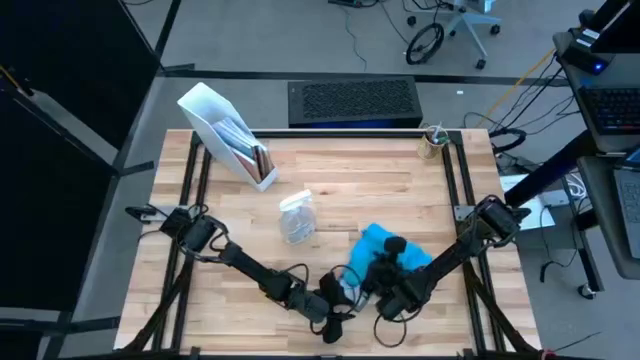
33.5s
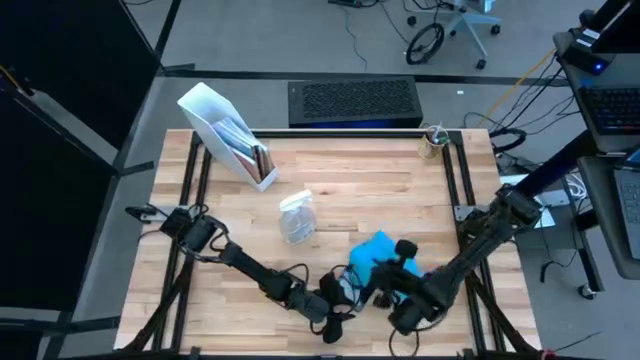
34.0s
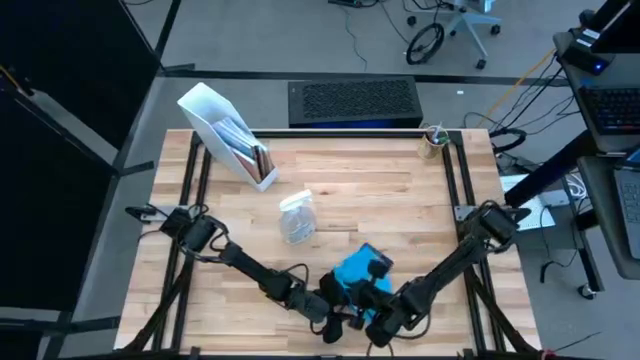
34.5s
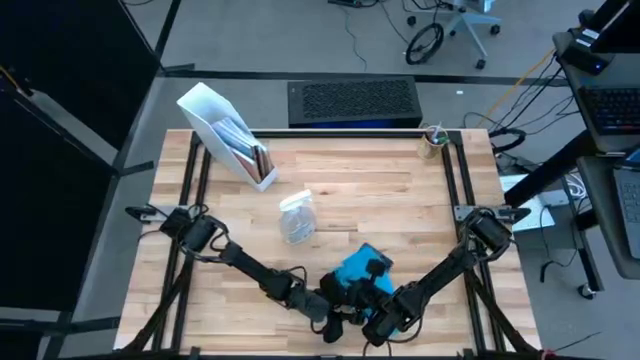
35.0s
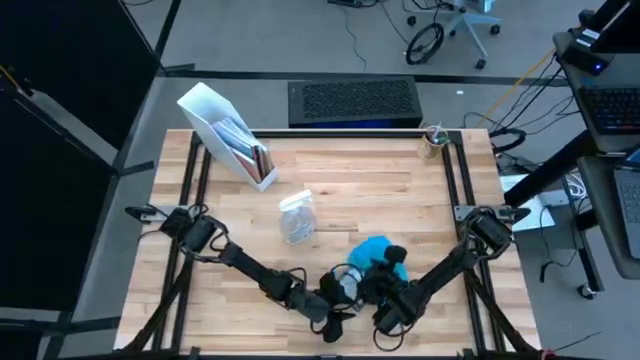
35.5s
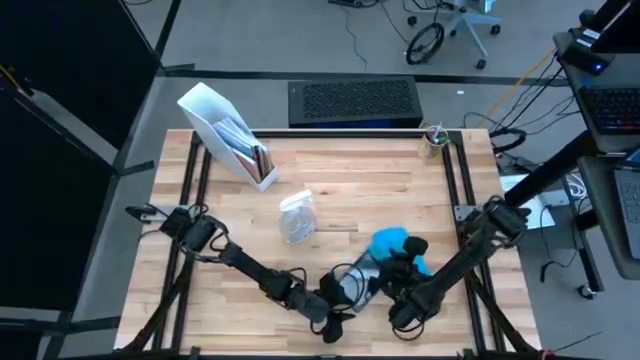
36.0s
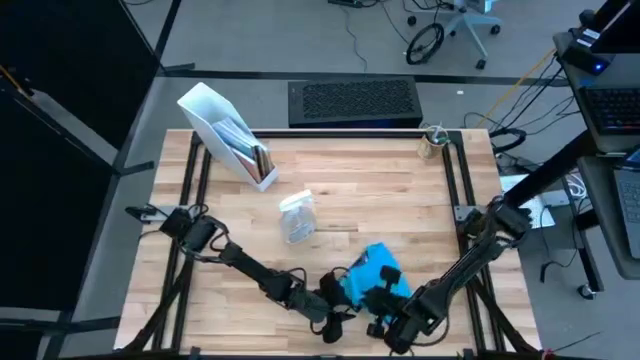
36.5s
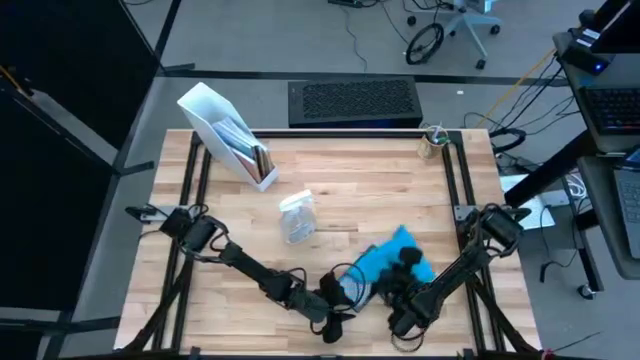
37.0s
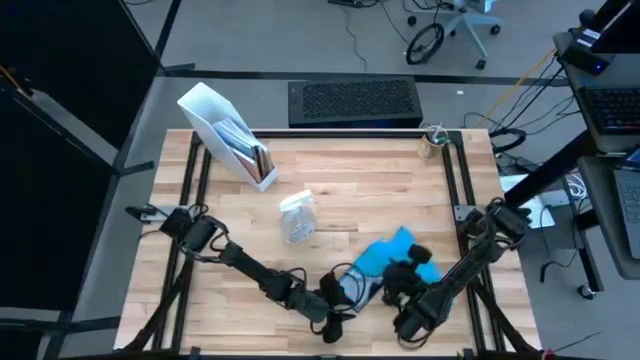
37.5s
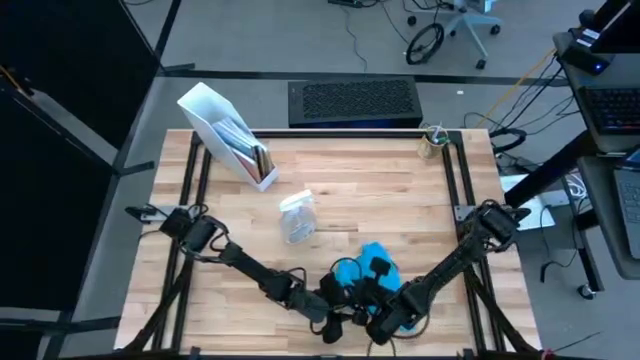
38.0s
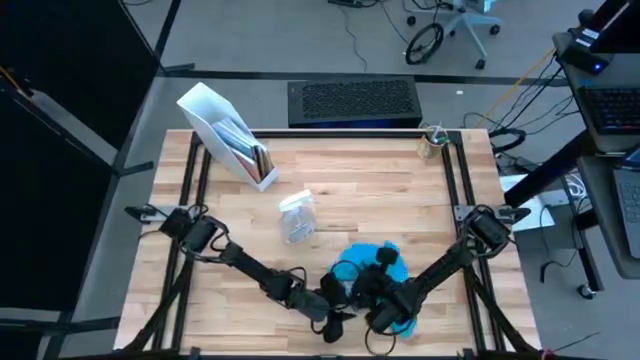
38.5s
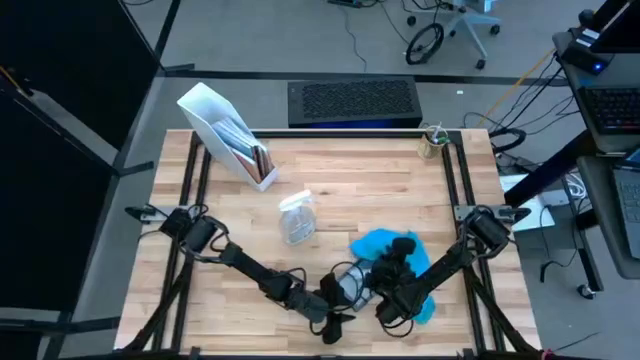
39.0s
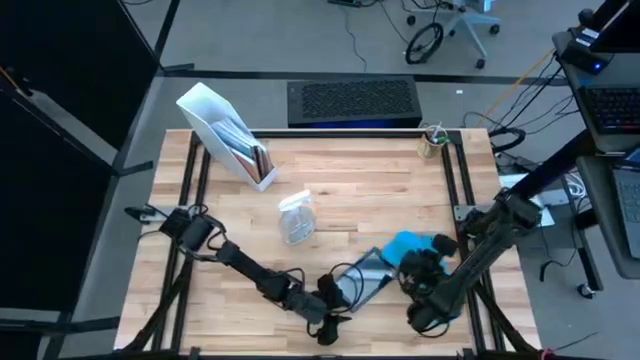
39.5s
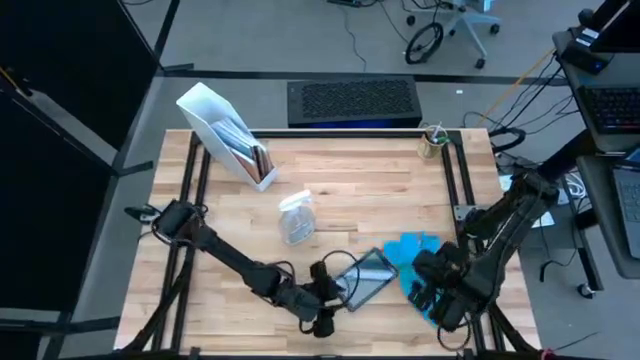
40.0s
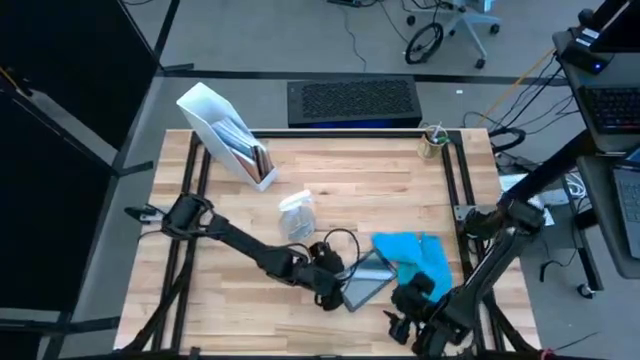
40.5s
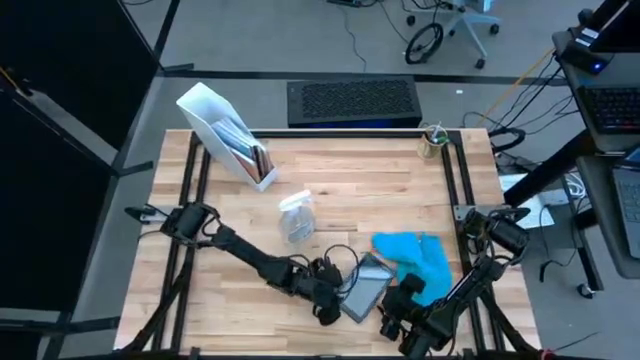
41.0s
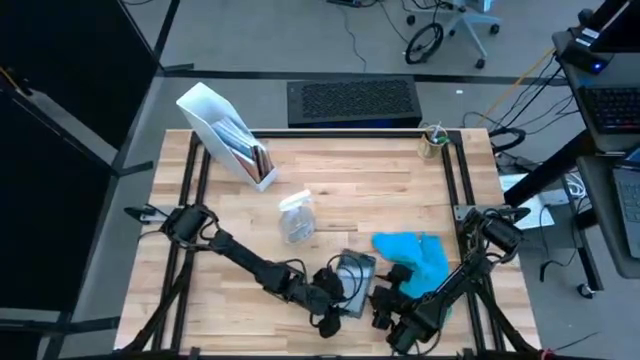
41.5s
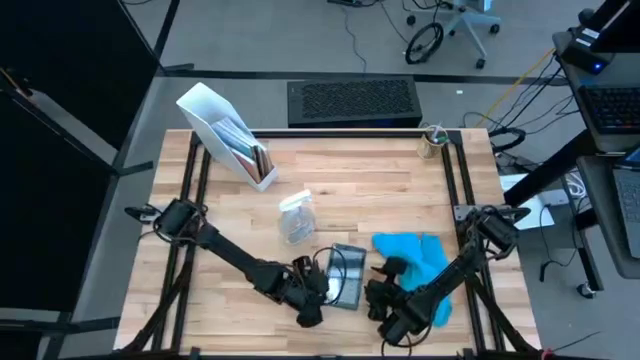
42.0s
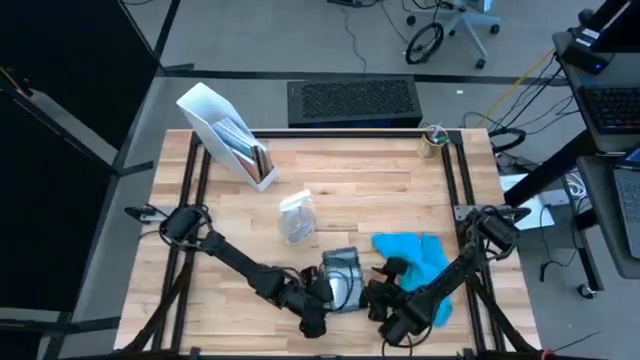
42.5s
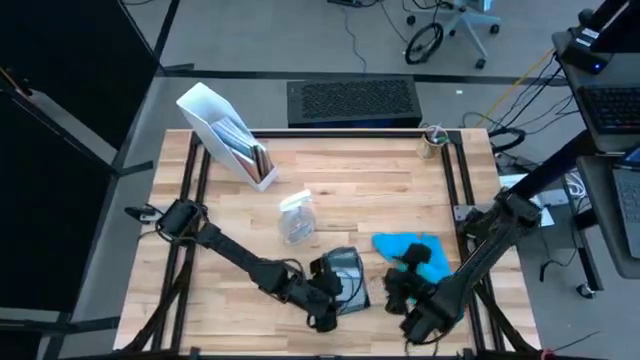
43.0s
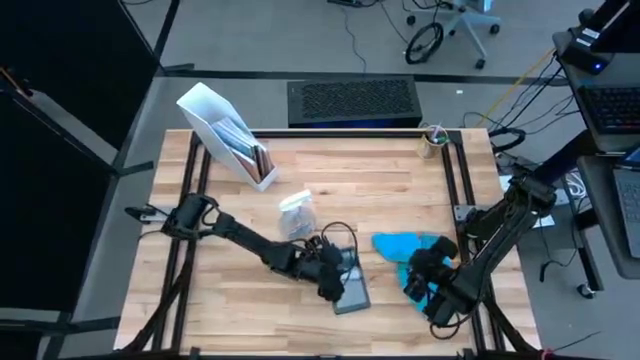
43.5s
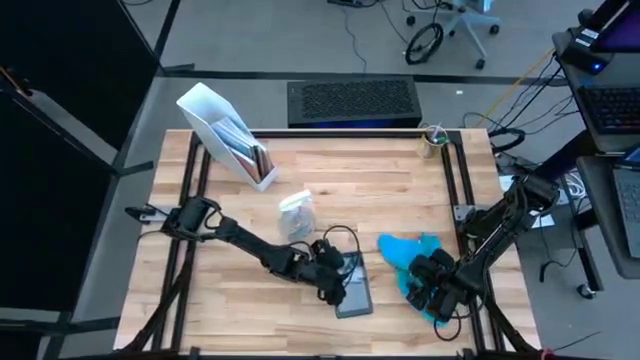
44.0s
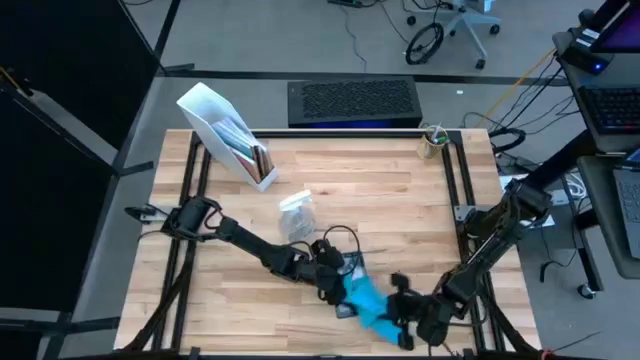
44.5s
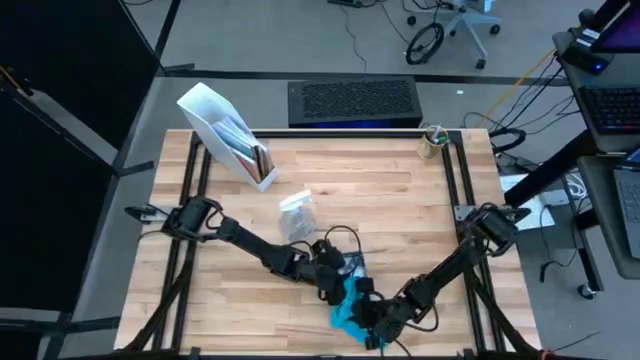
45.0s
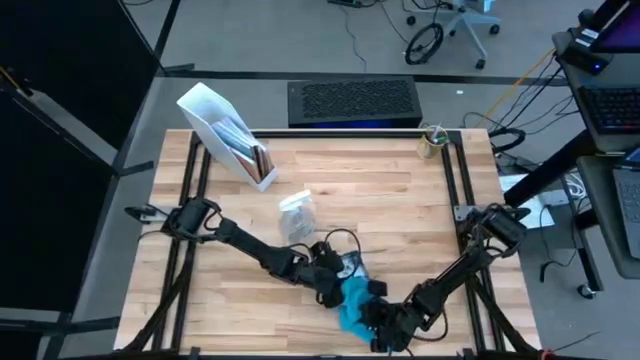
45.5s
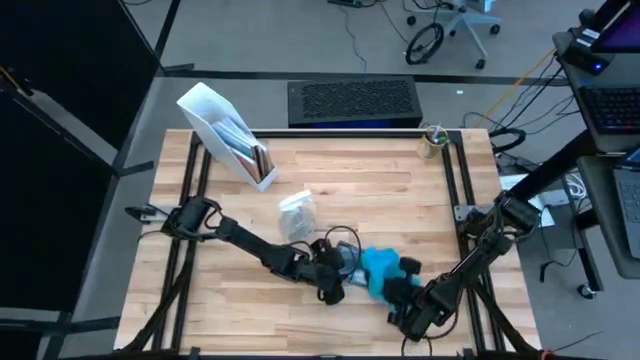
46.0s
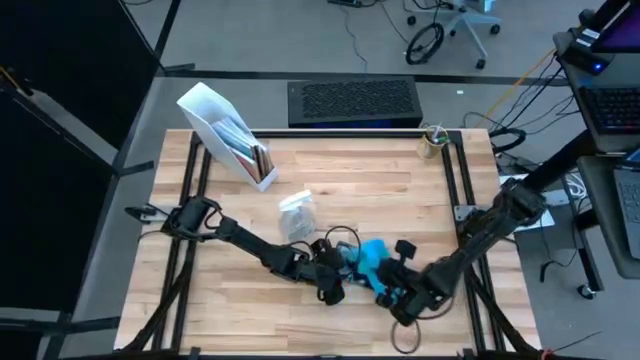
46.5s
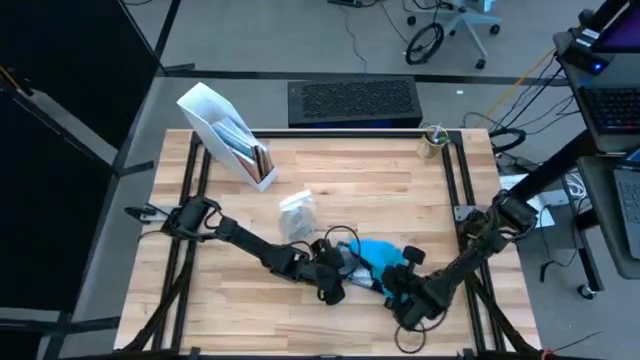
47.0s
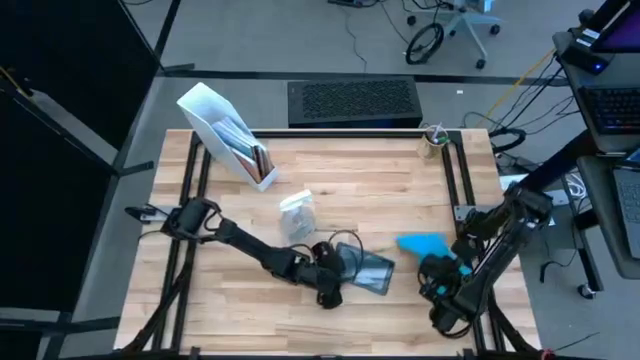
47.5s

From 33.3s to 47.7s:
Task: Apply microfiber cloth
Wipe the blue tablet with a blue microfiber cloth

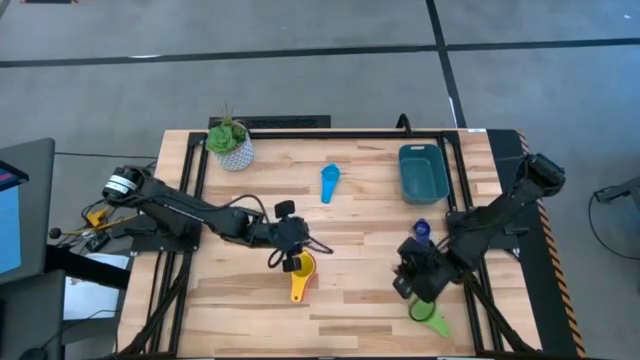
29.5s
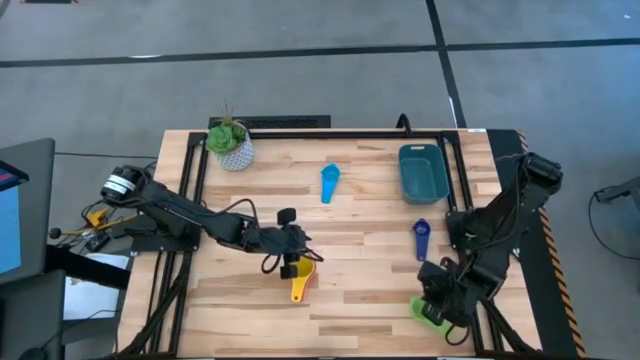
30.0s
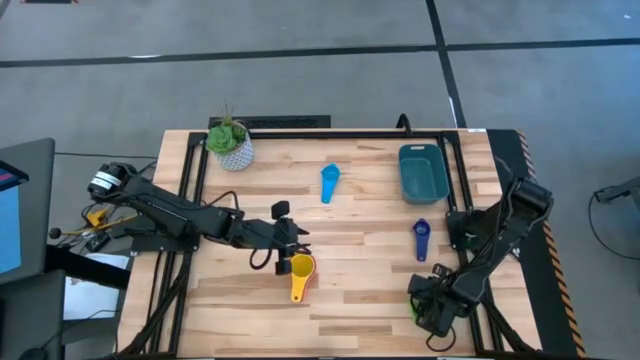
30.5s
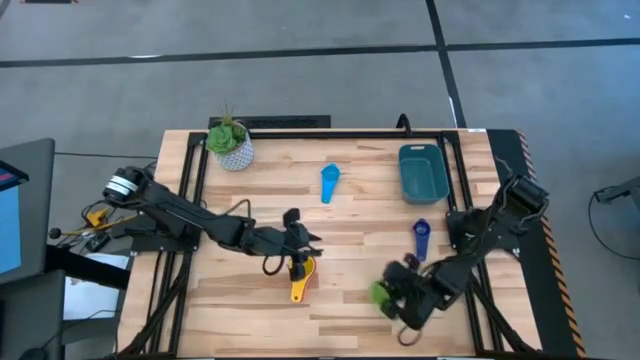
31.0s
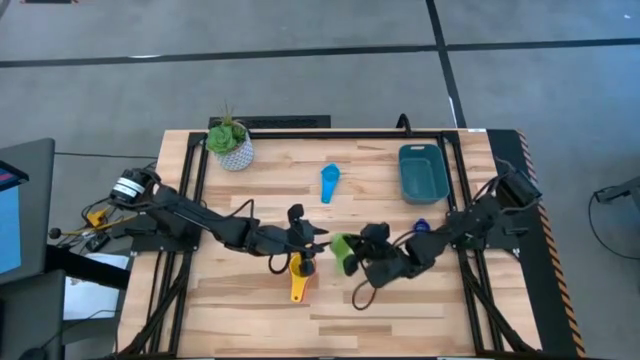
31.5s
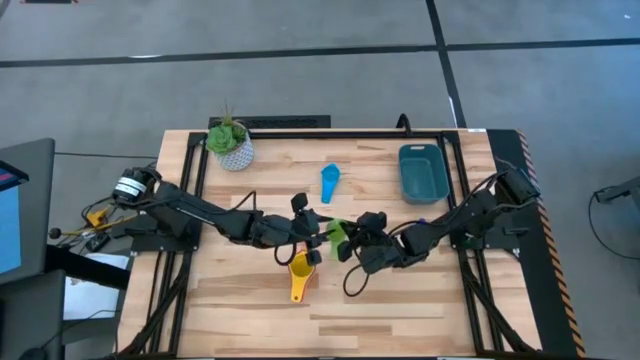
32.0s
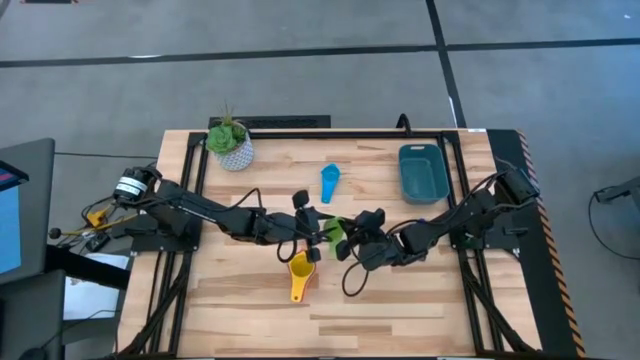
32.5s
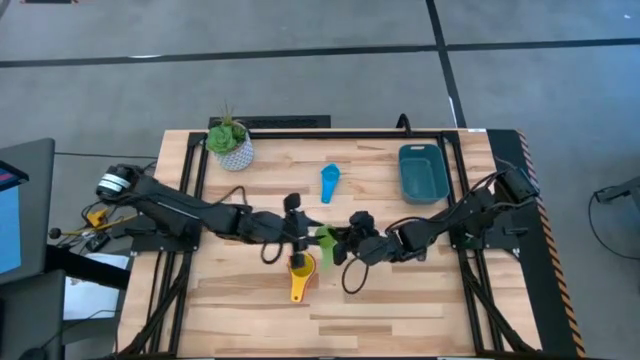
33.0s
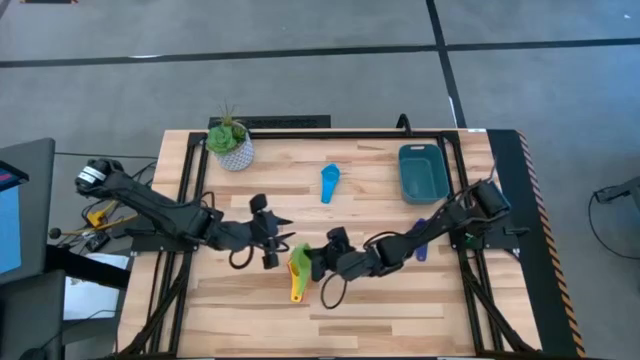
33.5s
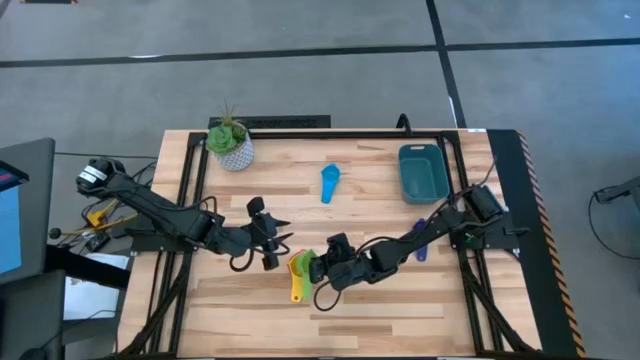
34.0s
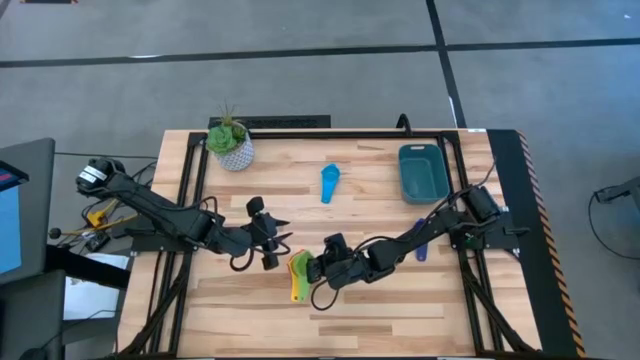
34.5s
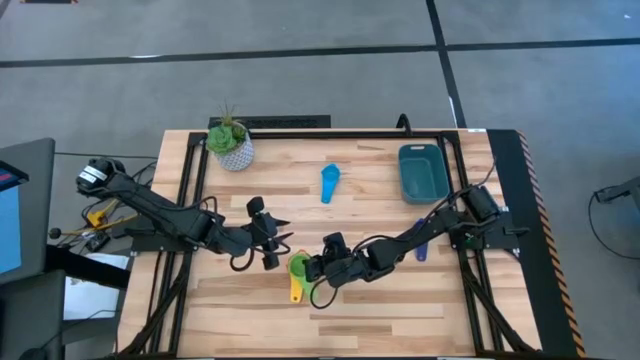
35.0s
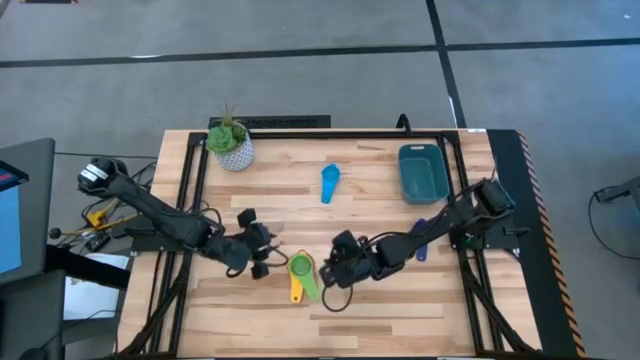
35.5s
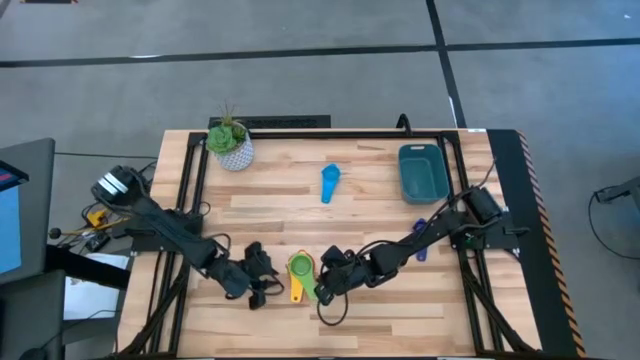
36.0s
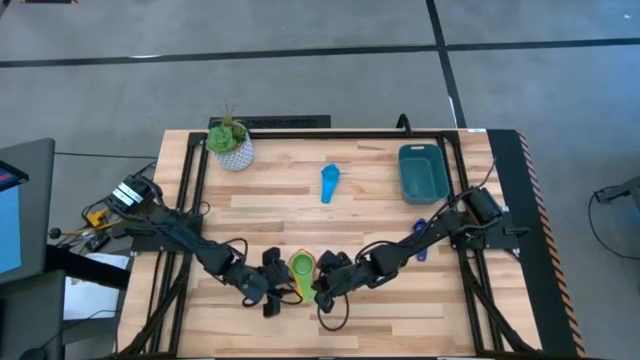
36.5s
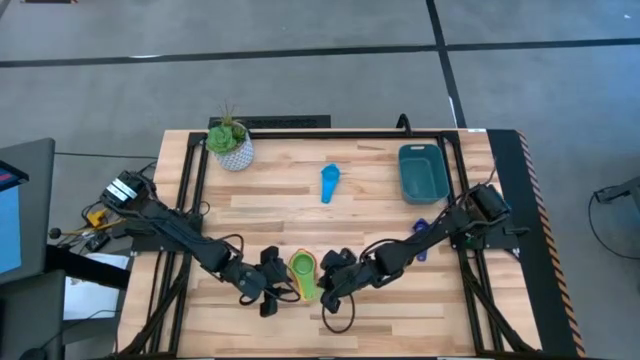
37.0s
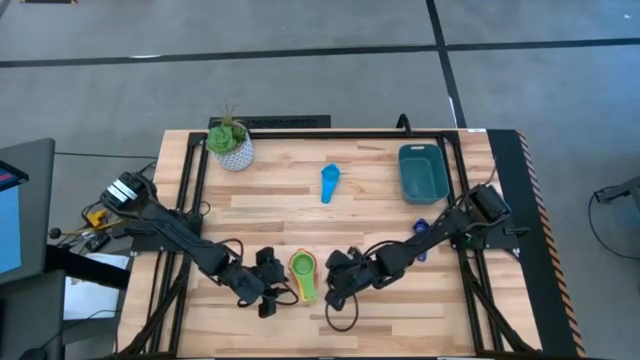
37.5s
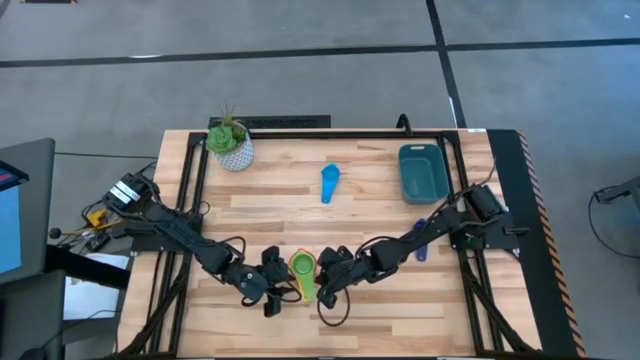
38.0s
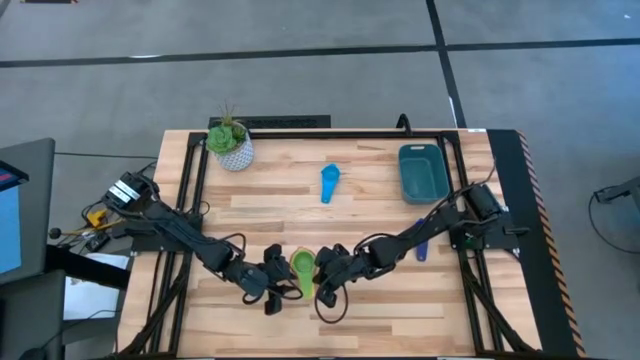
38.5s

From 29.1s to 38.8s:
Task: Nest measuring cups in basket
Stack the green measuring cup into the yellow measuring cup
